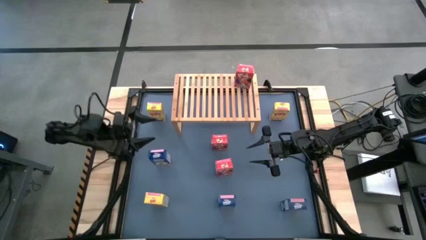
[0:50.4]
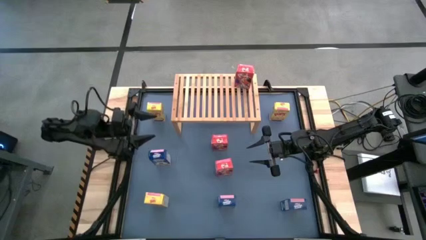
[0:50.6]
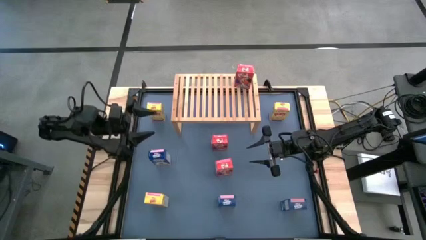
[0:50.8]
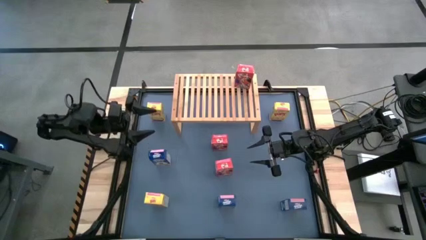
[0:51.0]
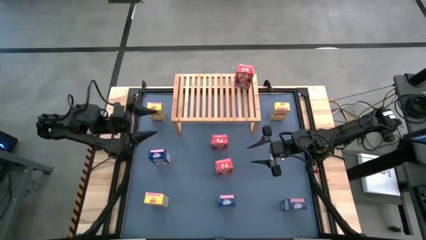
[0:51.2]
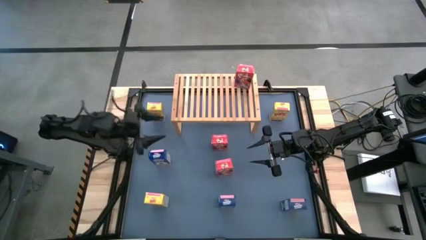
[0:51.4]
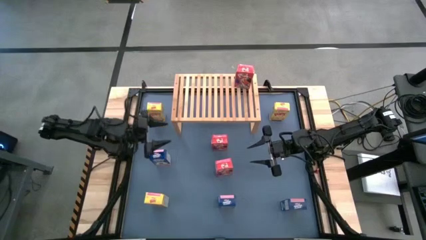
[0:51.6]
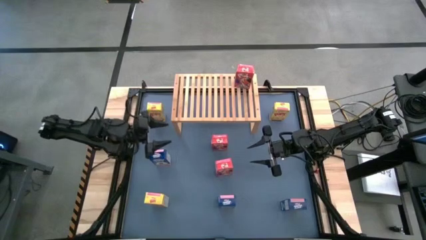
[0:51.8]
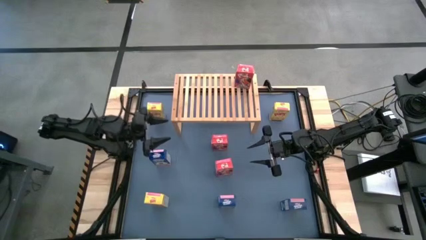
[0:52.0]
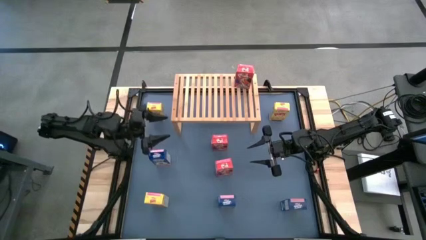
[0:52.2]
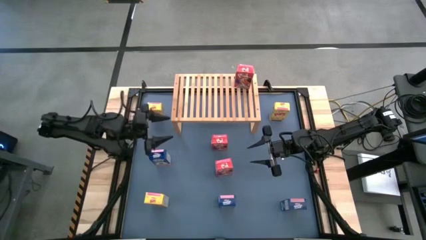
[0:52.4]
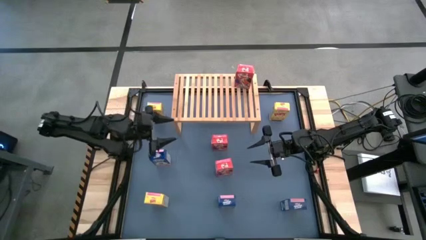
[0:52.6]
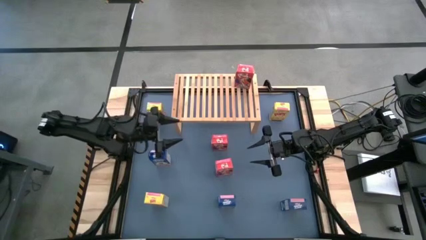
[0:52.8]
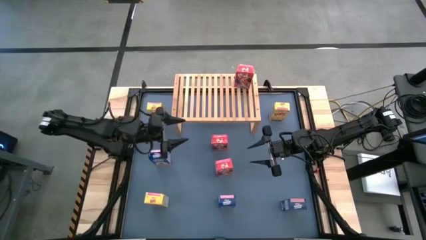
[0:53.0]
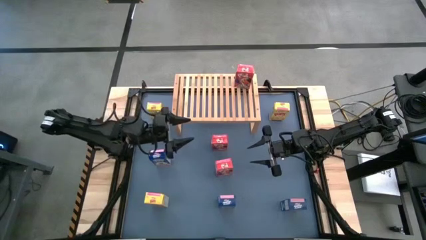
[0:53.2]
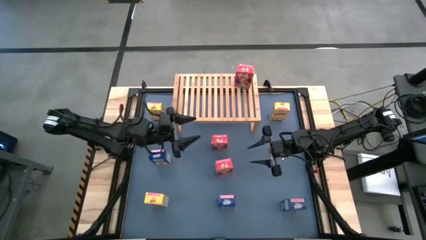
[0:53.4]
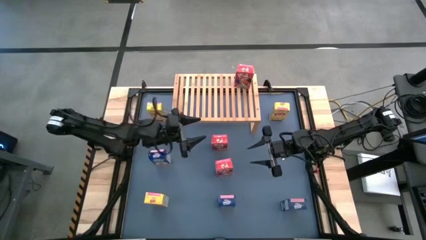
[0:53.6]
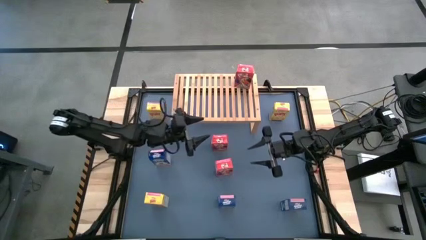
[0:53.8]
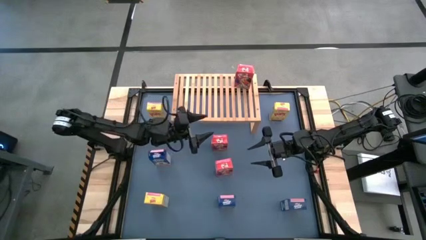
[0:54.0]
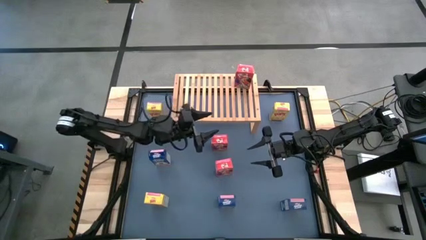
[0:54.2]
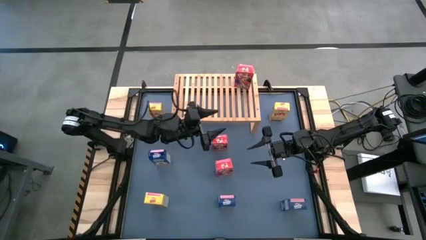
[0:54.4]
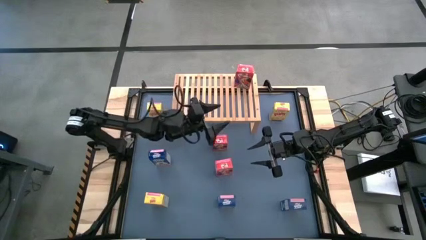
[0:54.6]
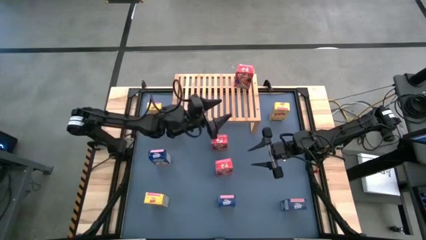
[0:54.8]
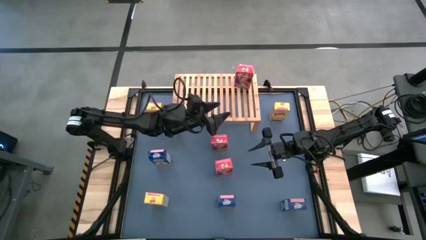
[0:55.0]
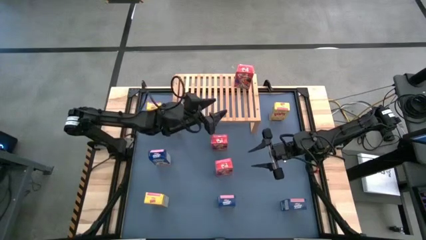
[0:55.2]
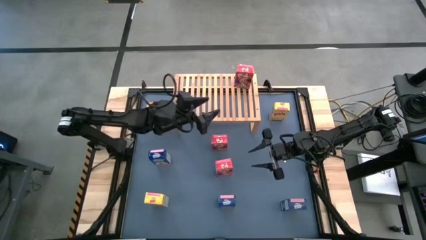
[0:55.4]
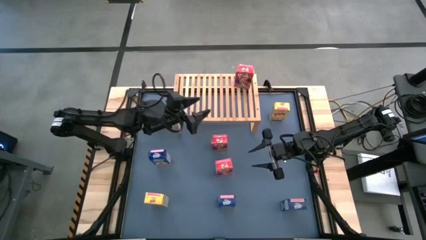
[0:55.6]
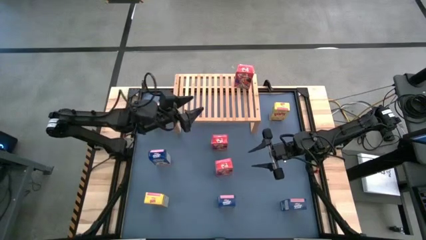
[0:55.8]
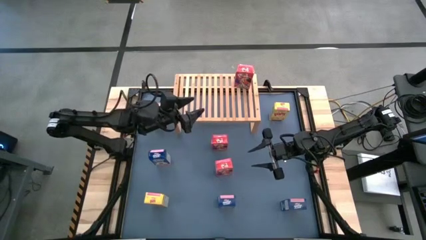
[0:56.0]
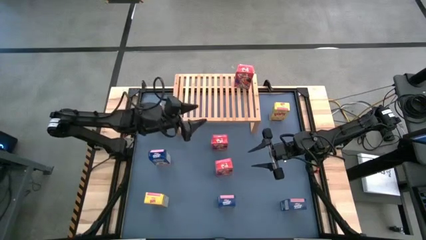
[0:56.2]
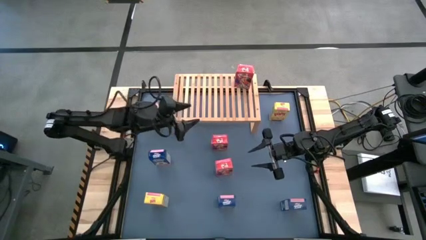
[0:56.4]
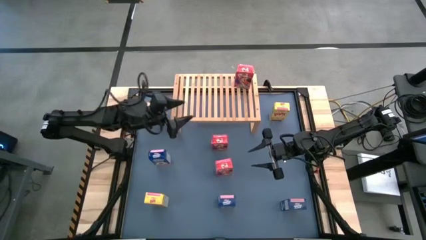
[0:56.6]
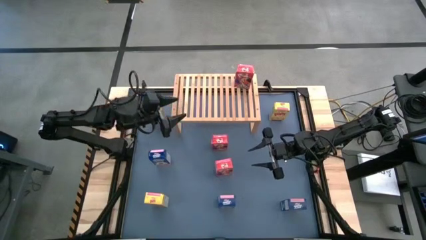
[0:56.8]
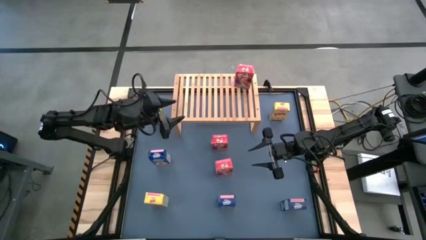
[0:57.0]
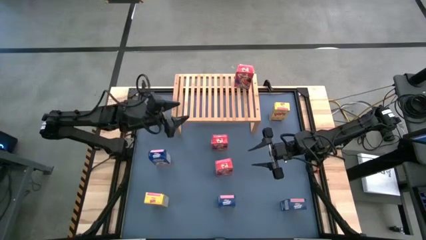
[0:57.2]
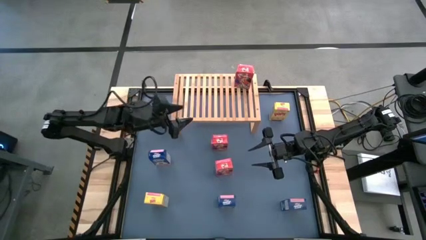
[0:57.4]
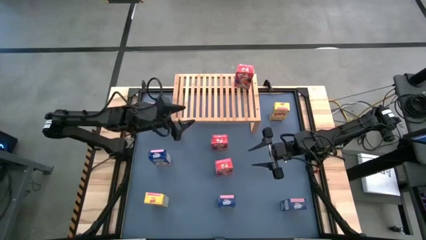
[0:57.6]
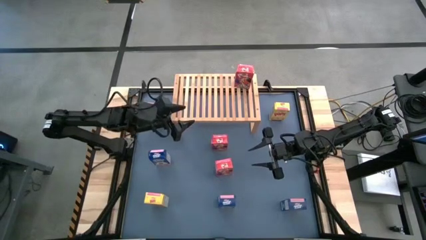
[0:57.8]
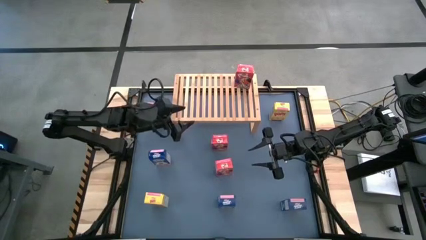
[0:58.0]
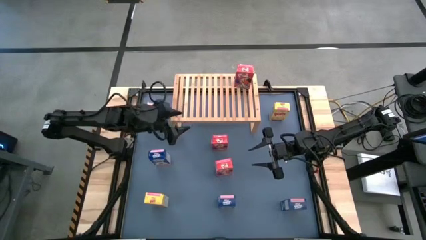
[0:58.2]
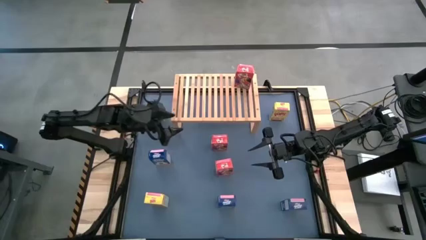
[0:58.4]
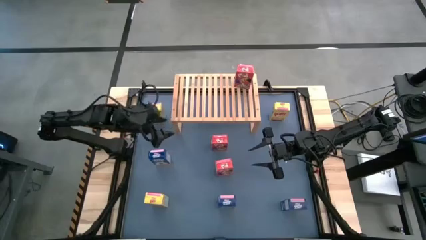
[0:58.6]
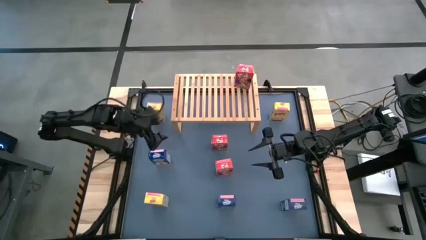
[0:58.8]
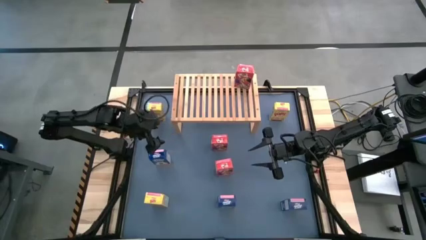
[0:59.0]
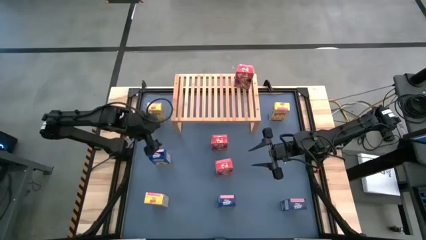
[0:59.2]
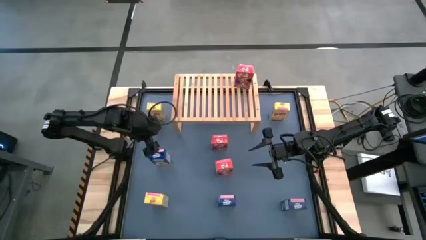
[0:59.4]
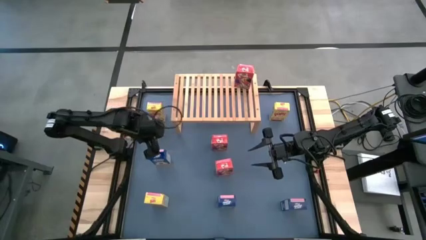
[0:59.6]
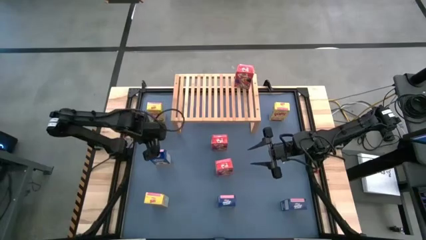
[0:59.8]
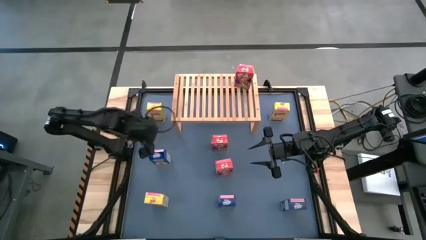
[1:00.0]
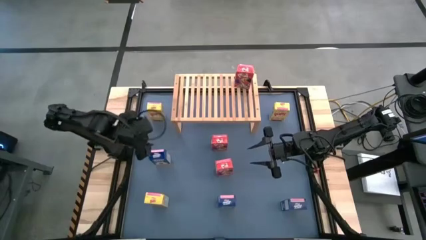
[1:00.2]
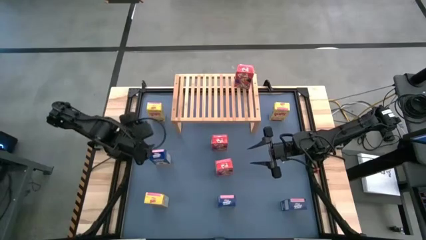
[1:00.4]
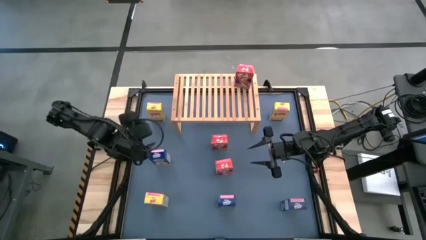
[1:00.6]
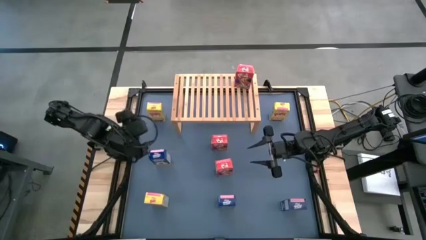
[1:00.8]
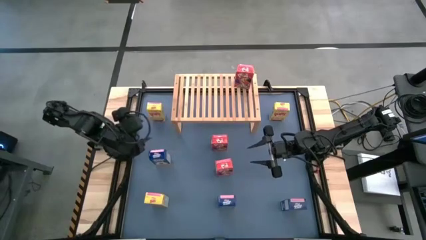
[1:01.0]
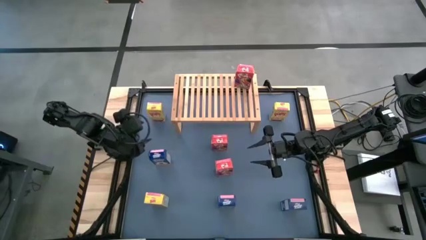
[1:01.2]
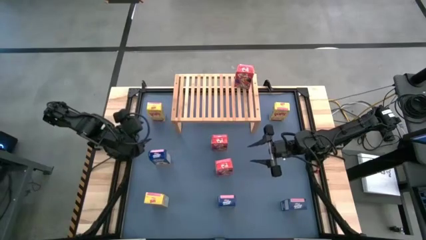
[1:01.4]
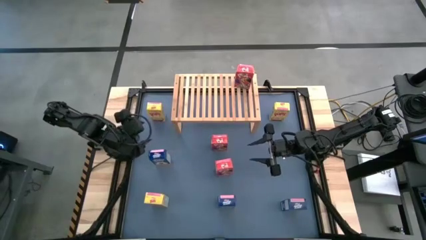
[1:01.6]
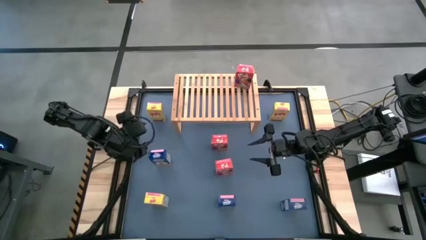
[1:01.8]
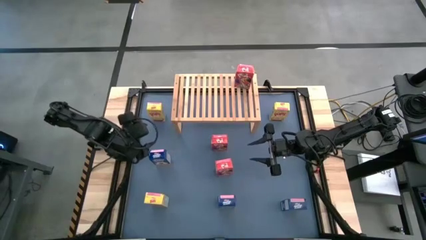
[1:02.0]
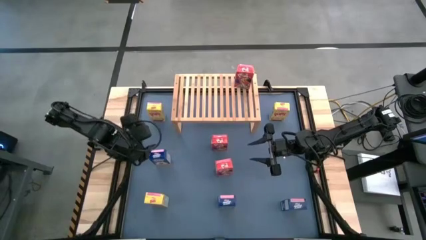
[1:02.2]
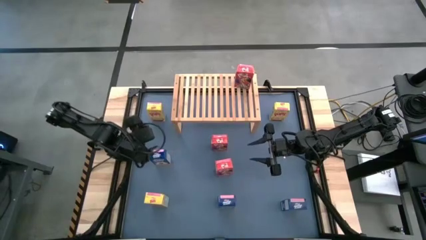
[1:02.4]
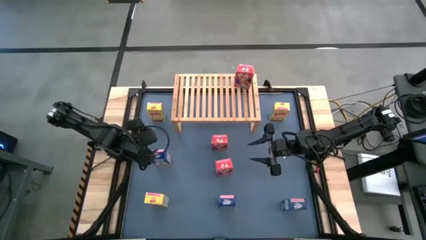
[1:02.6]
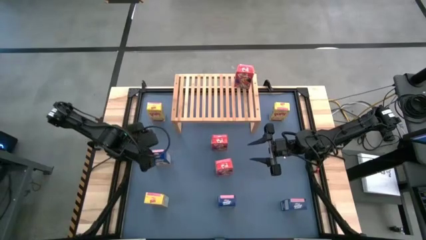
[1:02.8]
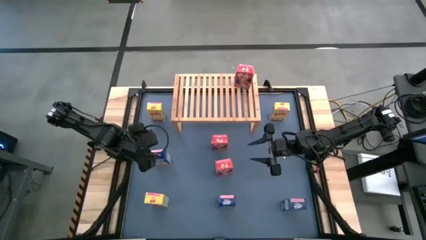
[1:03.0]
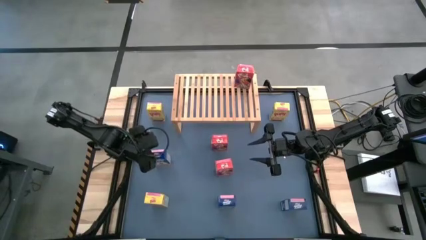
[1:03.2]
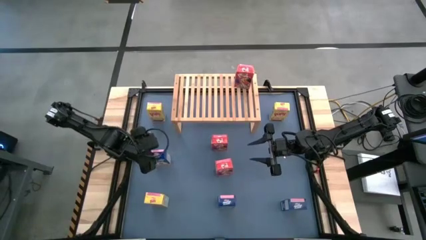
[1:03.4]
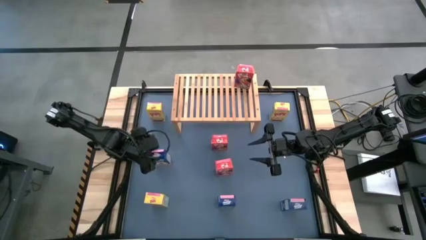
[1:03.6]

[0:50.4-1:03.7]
Task: Stack cereal on shelf
Put the top blue cereal box on the shelf

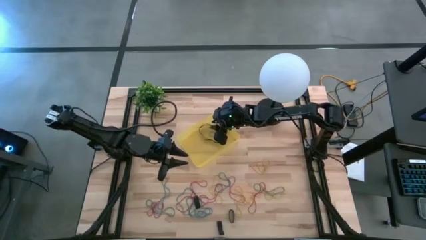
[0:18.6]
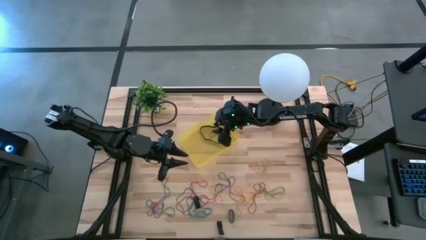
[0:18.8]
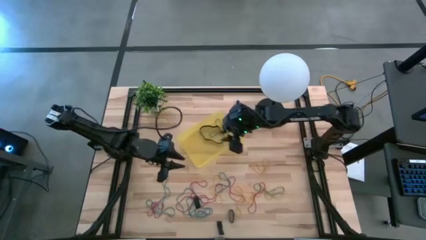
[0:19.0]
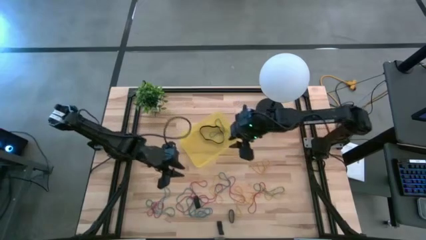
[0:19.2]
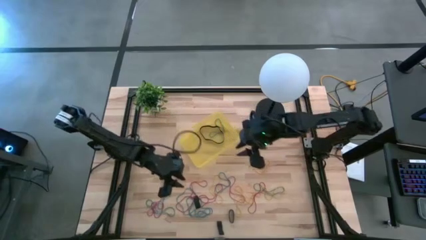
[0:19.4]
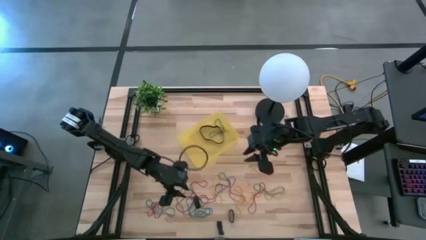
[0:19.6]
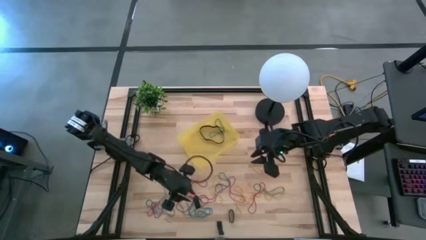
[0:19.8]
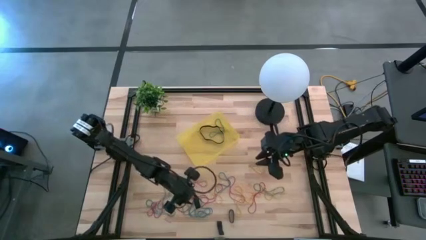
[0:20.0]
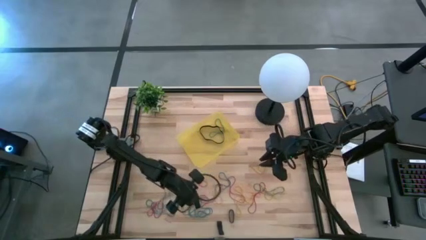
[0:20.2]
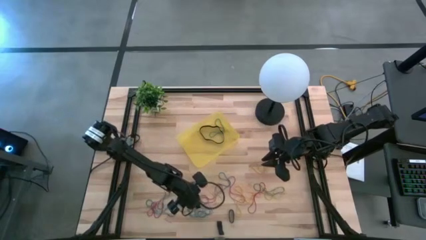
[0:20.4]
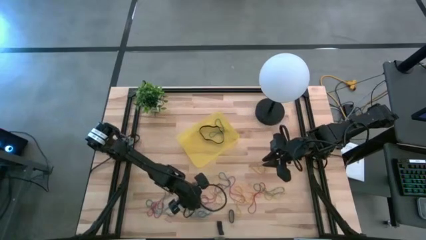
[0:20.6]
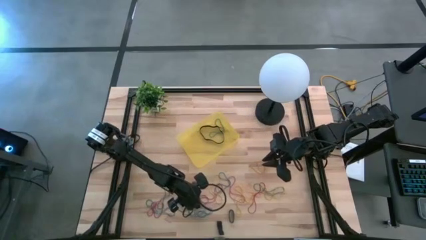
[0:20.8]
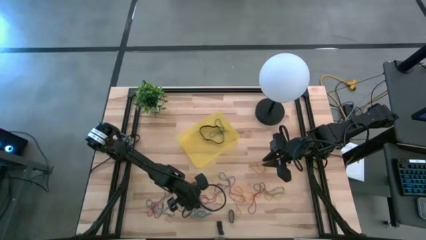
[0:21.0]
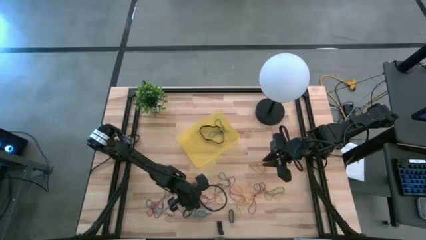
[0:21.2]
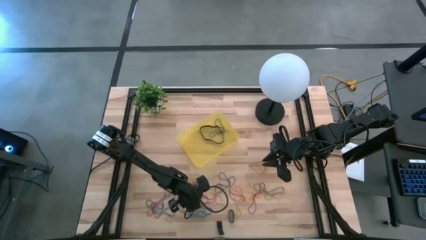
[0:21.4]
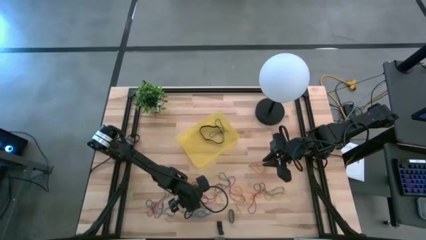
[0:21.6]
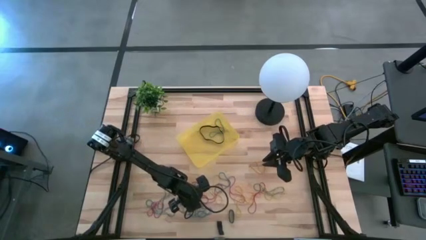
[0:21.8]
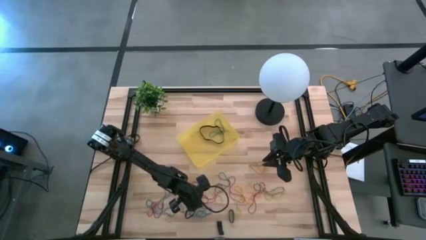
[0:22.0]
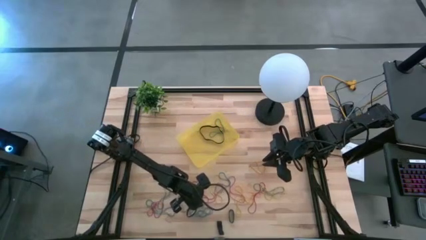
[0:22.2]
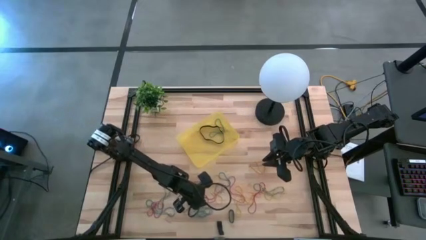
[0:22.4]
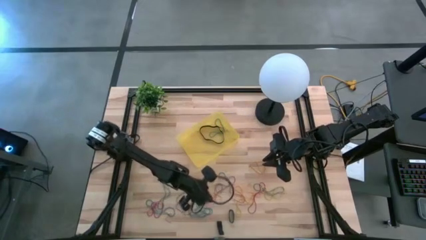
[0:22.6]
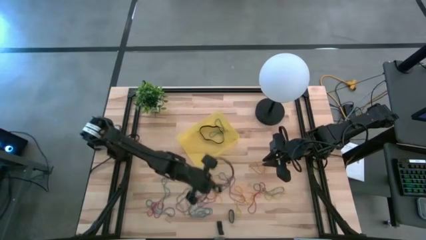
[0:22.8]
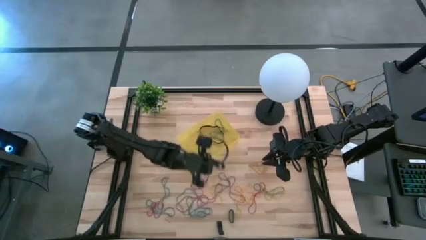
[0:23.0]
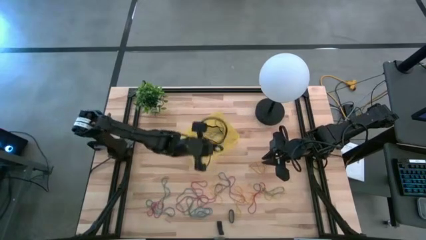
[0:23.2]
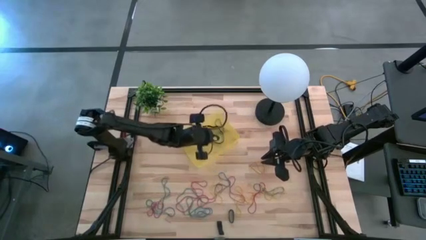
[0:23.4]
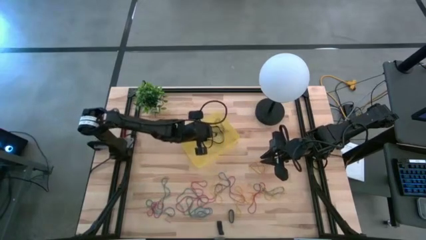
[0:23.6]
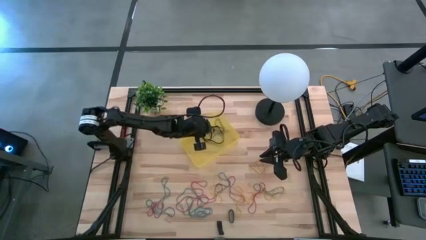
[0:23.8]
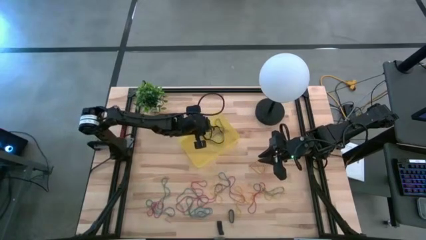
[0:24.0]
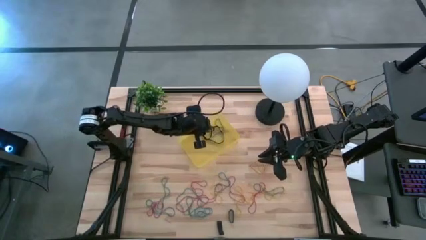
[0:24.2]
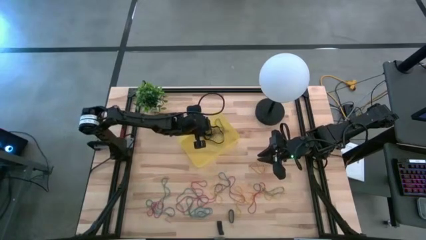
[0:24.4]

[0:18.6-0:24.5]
Task: Pick and place rubber bands into bin
Put the black rubber band into the yellow bin
